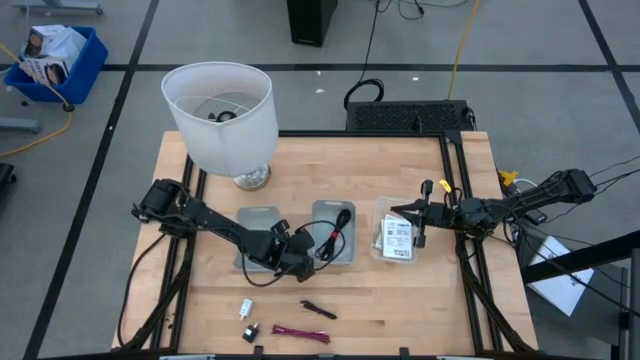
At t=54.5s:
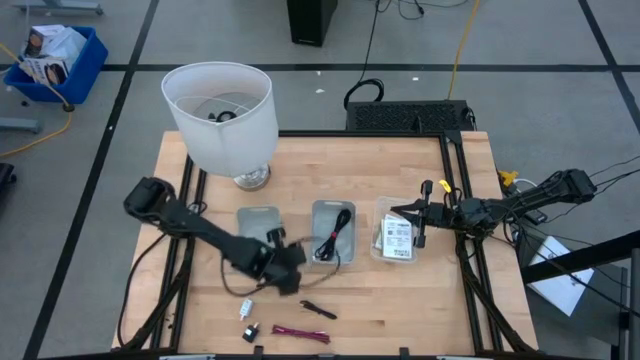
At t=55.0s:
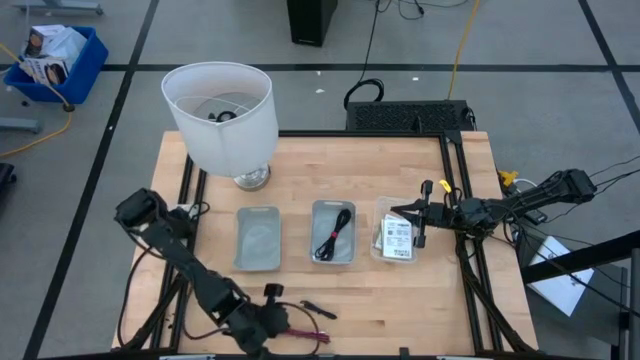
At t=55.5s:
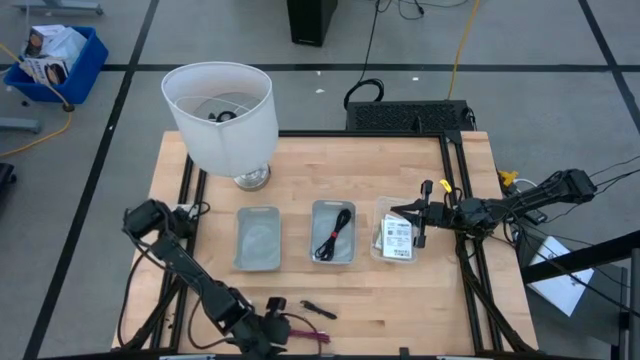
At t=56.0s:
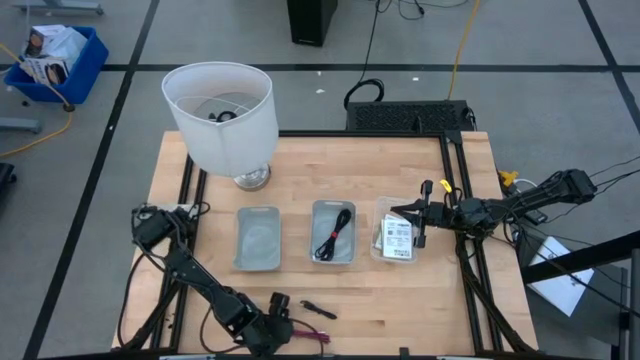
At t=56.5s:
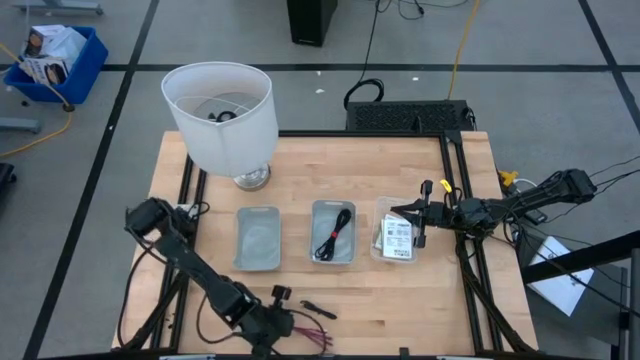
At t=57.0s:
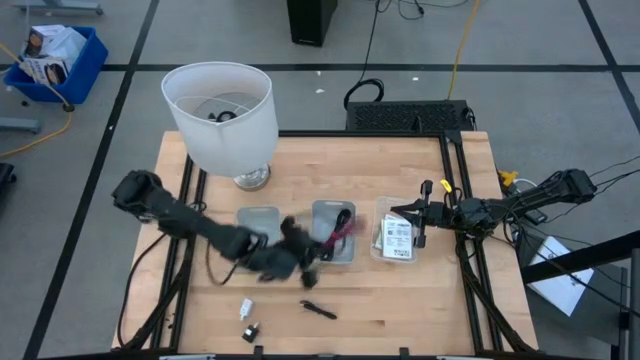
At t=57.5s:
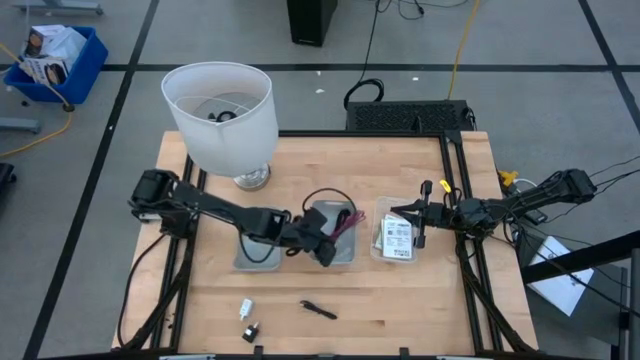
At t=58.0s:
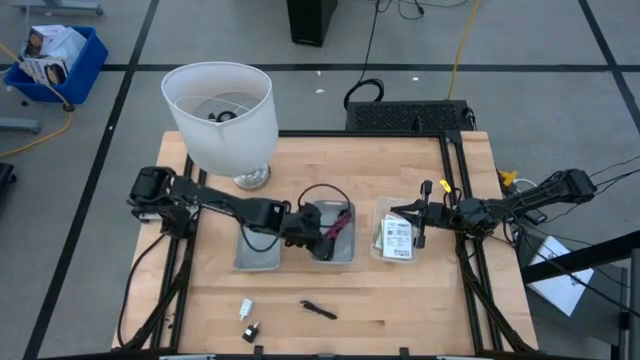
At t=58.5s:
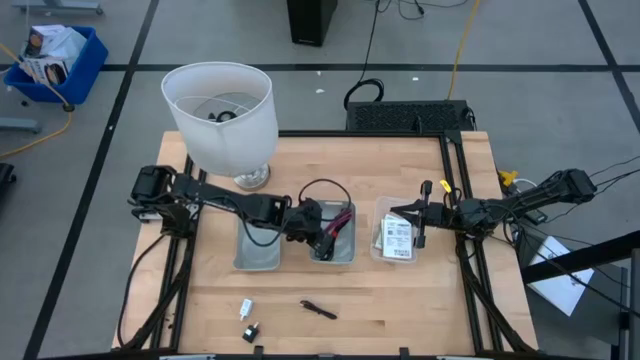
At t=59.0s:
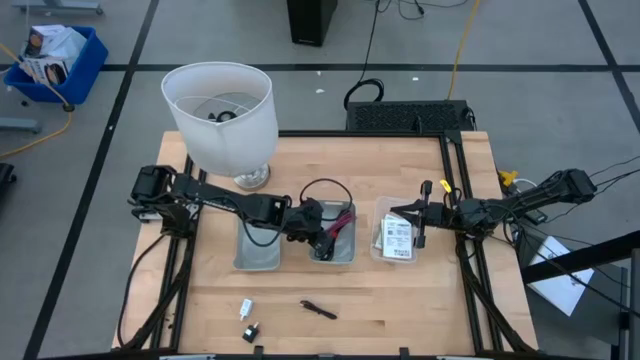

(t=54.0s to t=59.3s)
Task: Pick and place items into bin
Put the black pink charger cable into the right gray bin

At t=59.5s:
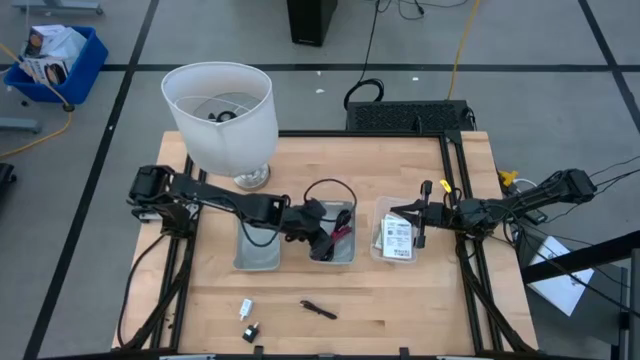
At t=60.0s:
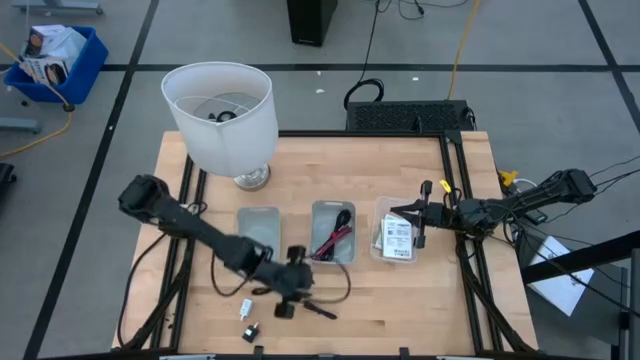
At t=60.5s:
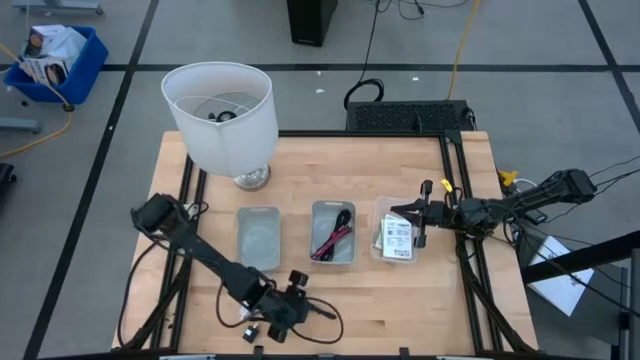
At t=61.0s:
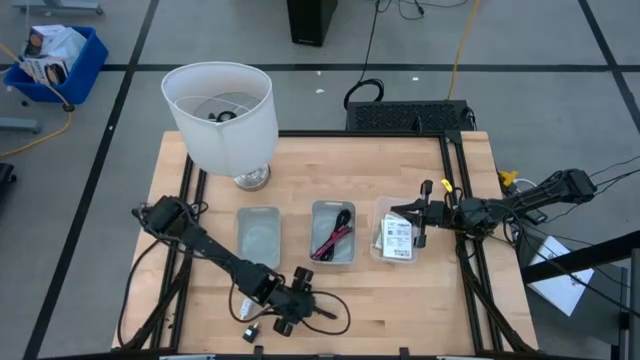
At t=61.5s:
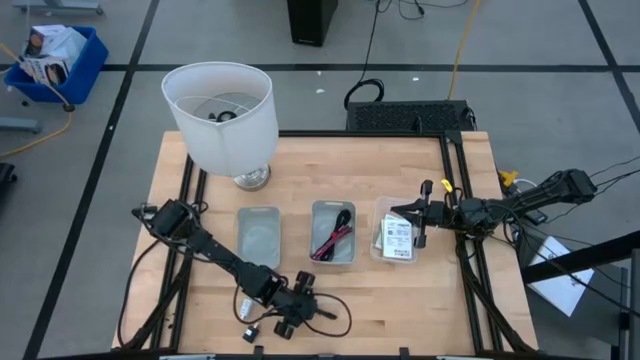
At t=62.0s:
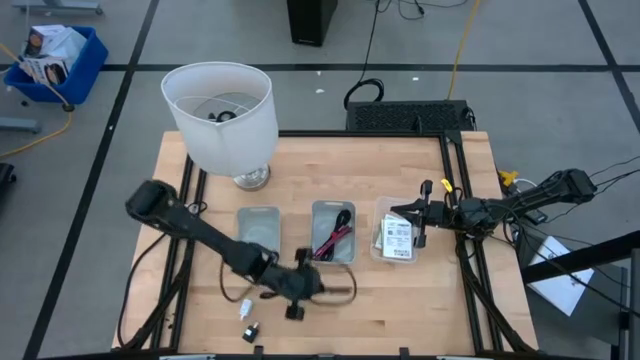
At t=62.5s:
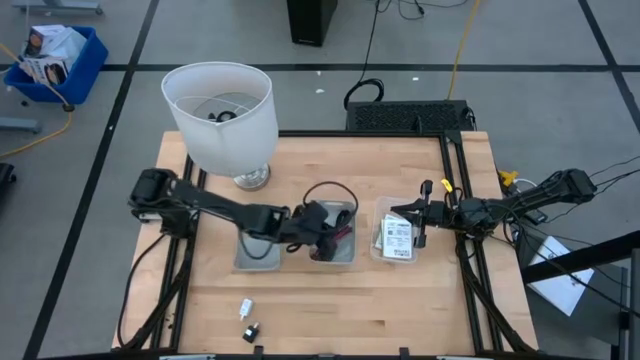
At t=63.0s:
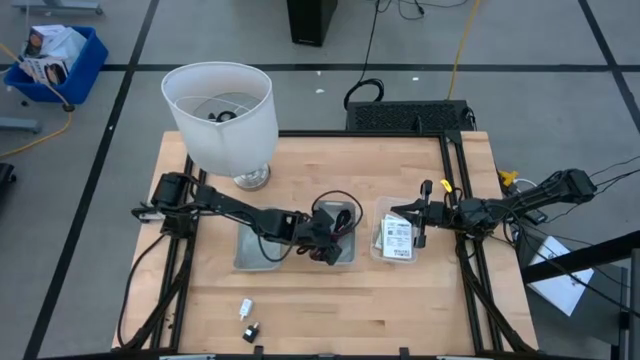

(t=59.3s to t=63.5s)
Put the black charger cable into the right gray bin

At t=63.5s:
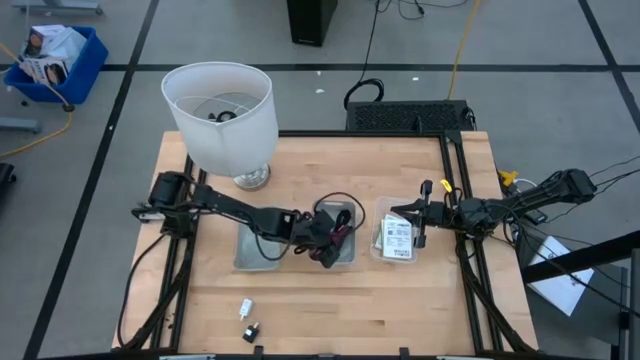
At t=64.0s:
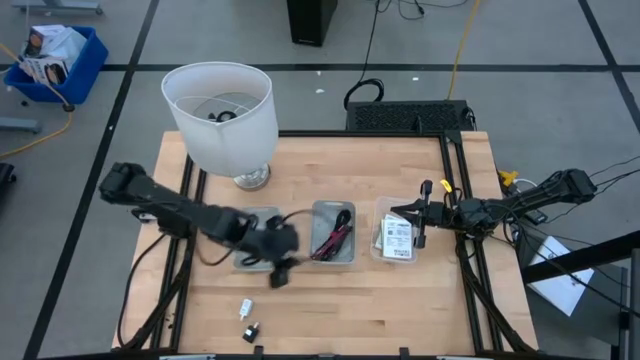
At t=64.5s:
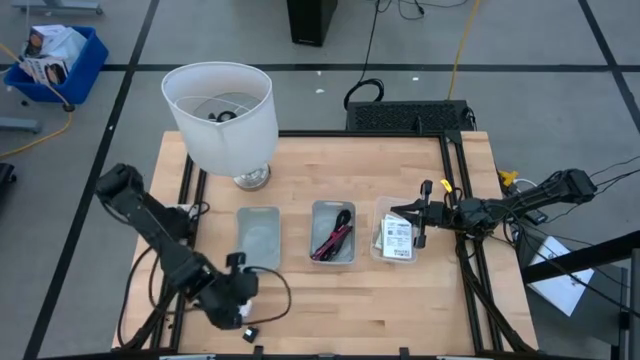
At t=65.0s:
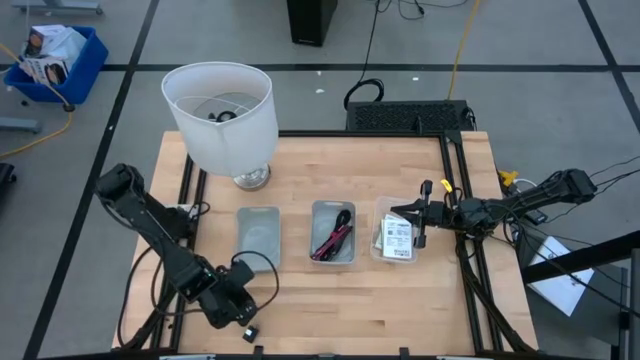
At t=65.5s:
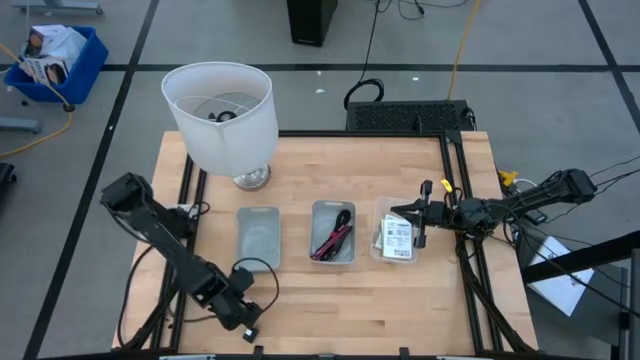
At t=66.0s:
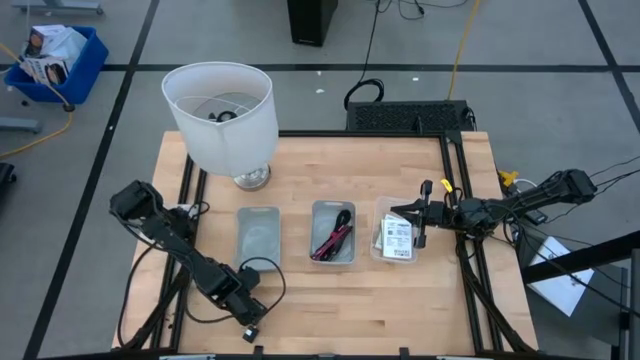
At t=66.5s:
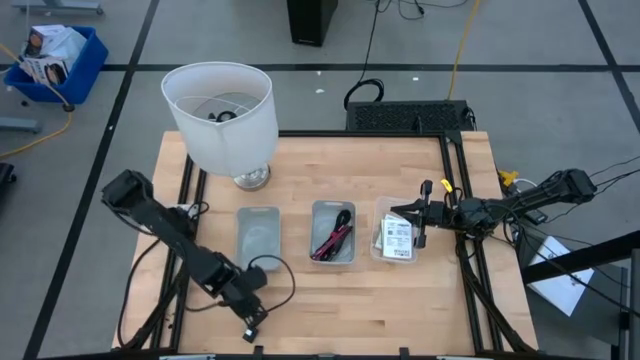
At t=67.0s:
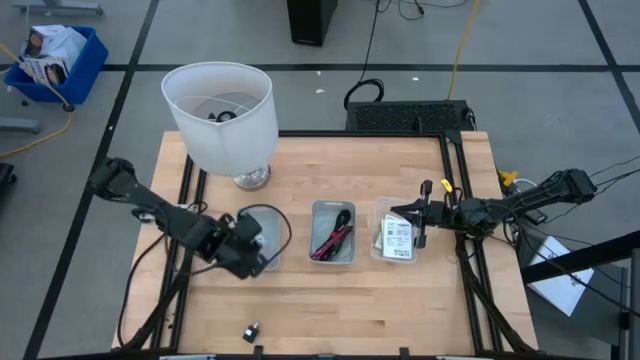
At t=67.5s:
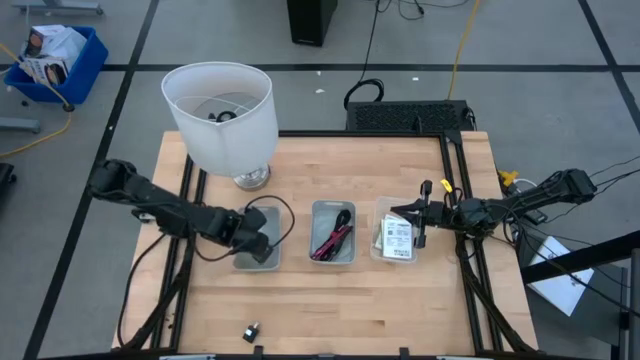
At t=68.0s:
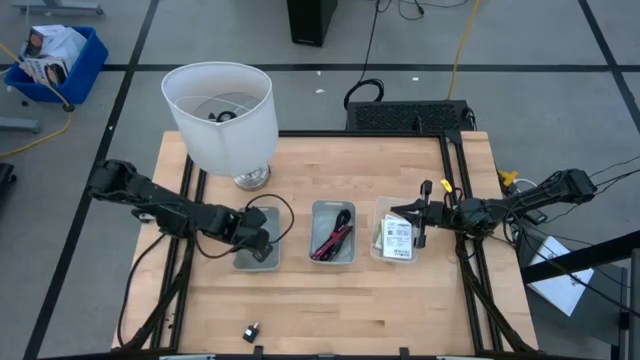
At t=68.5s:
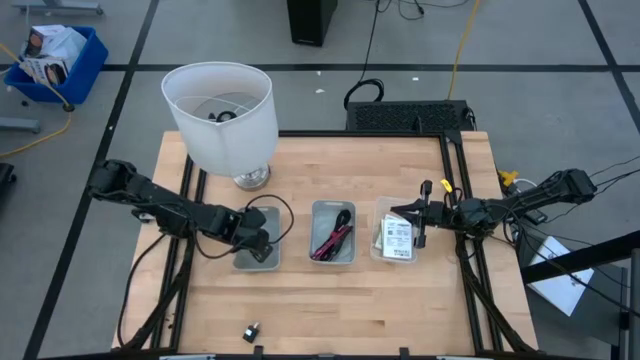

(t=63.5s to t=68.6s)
Put the white charger adapter into the left gray bin

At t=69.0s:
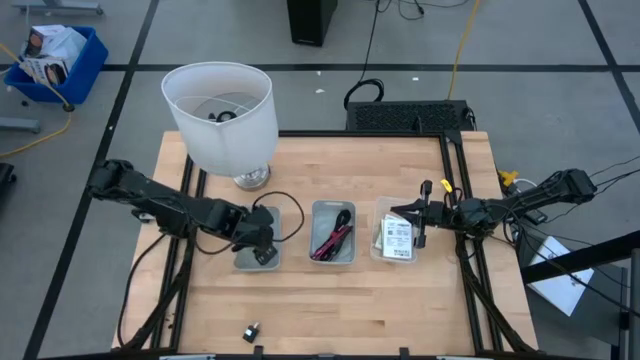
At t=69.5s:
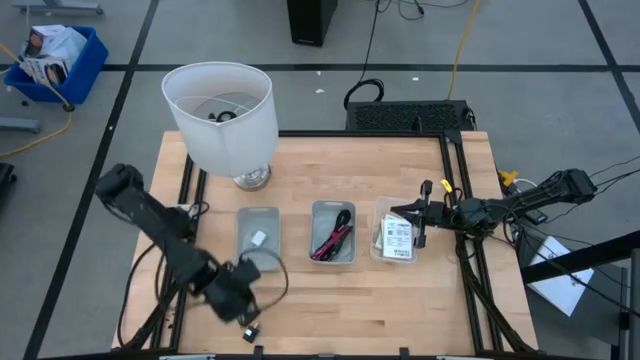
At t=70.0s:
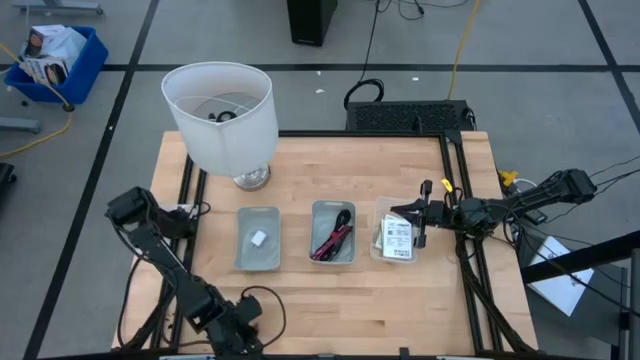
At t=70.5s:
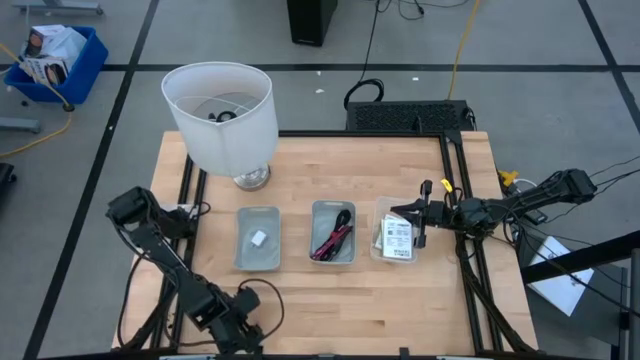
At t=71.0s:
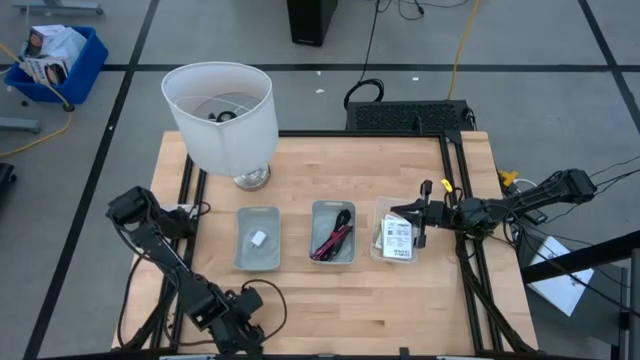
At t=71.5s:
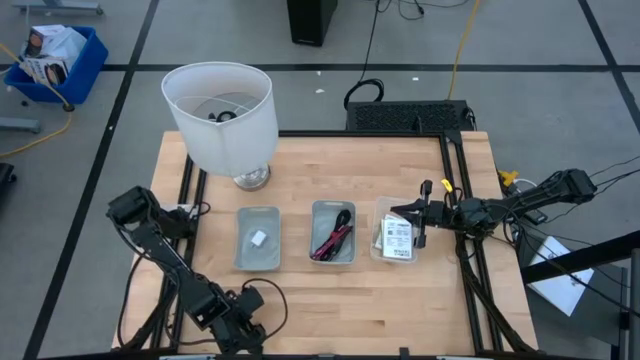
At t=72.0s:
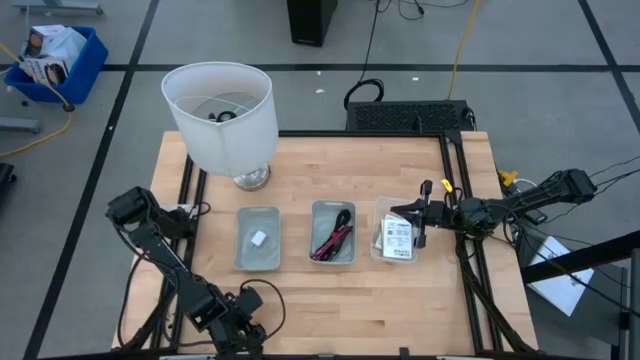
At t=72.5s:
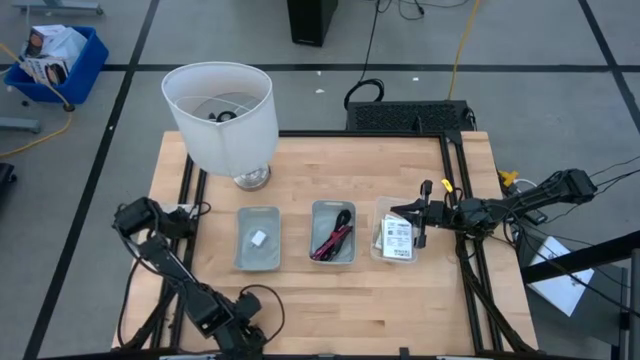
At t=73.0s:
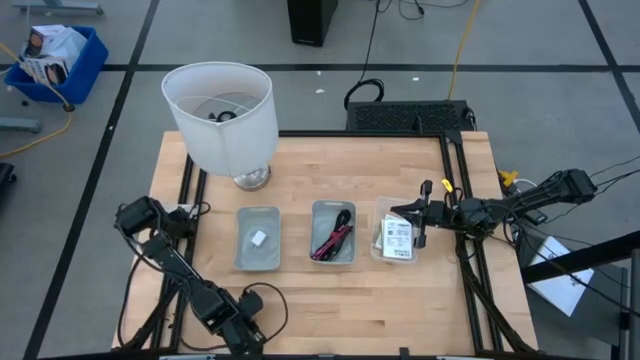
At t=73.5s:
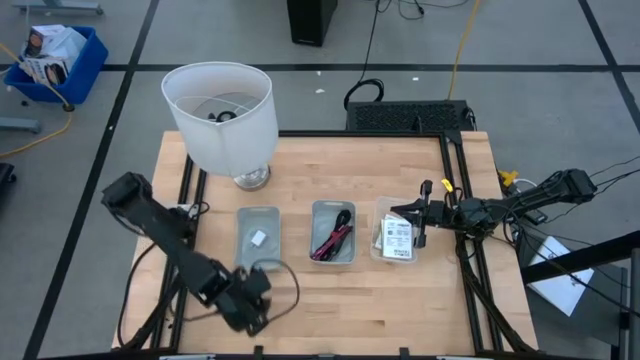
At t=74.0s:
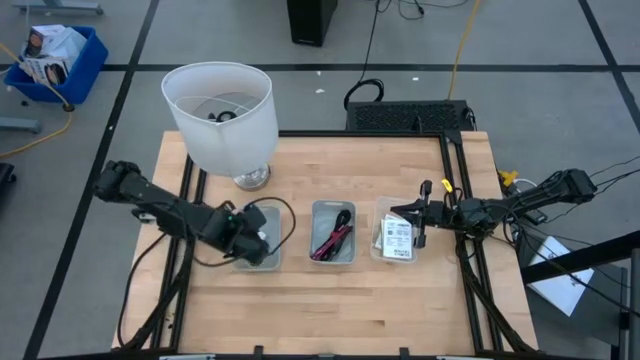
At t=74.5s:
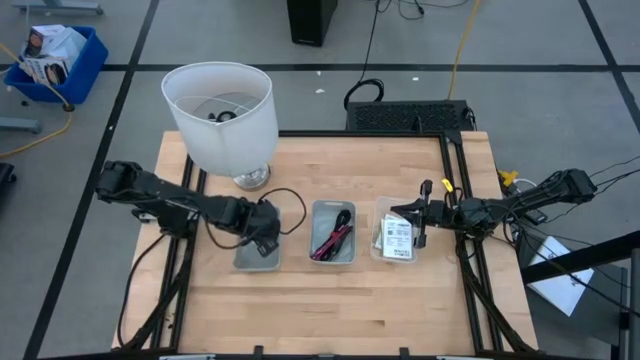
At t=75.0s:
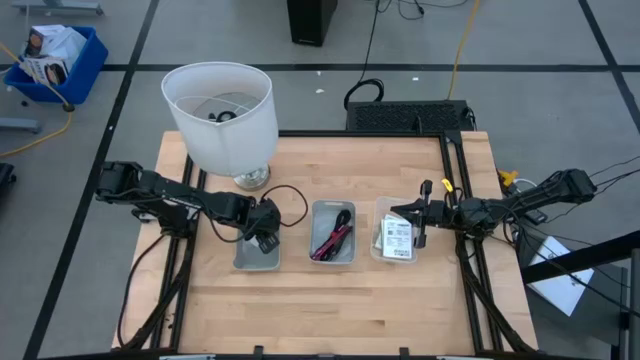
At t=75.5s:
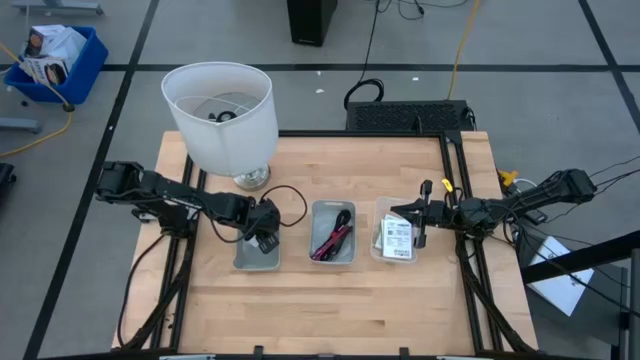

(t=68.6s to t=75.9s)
Put the black charger adapter into the left gray bin
